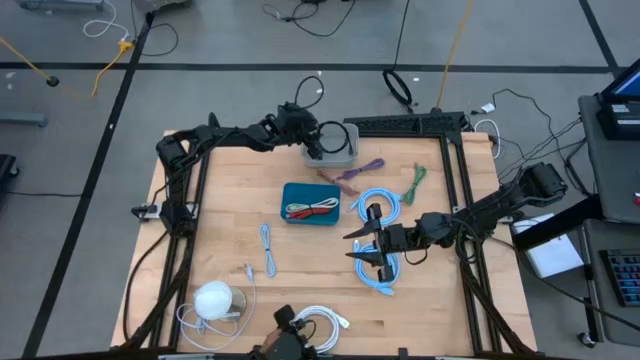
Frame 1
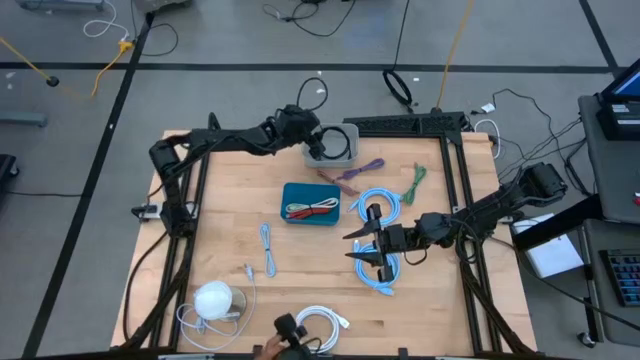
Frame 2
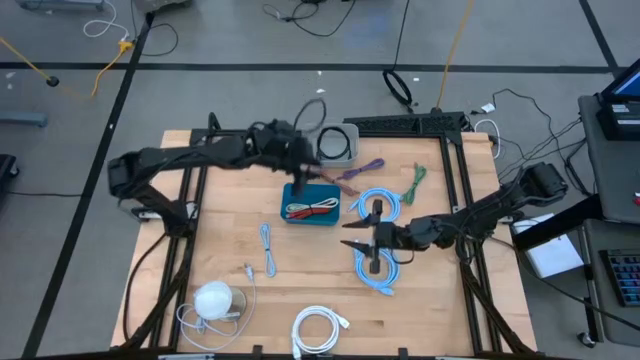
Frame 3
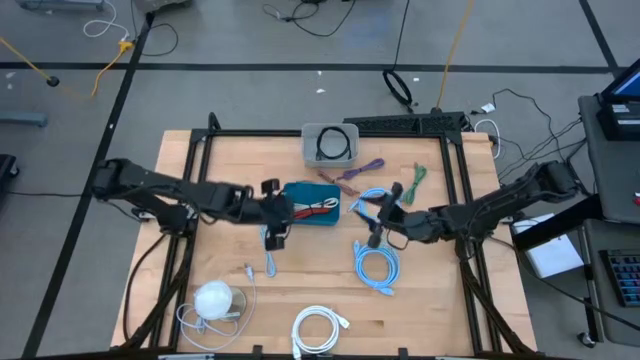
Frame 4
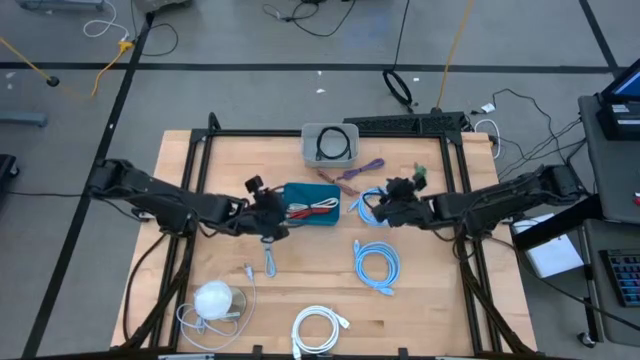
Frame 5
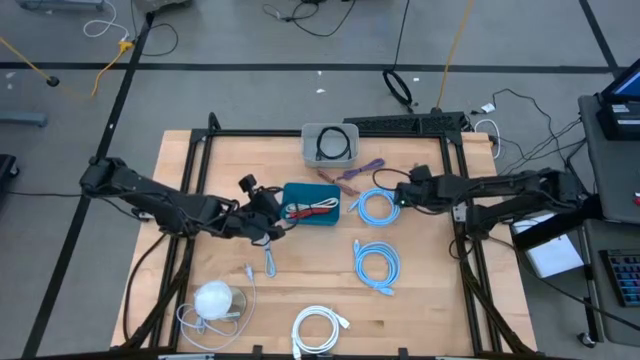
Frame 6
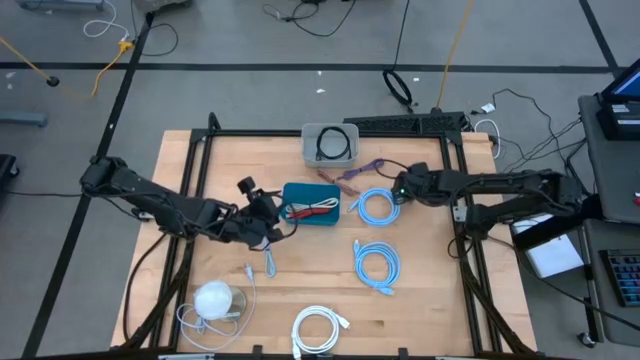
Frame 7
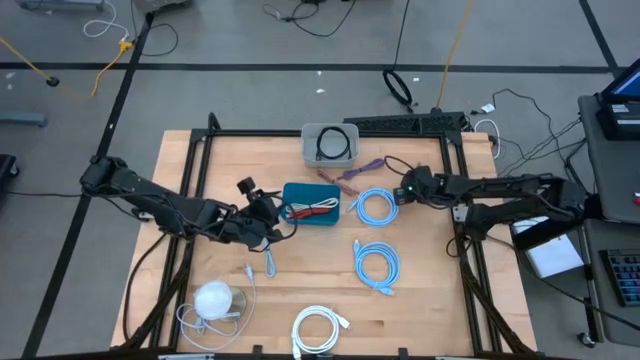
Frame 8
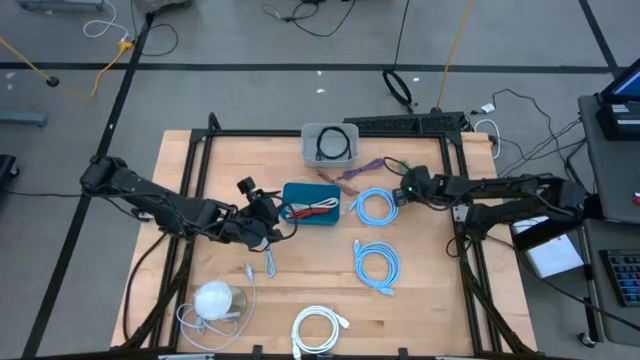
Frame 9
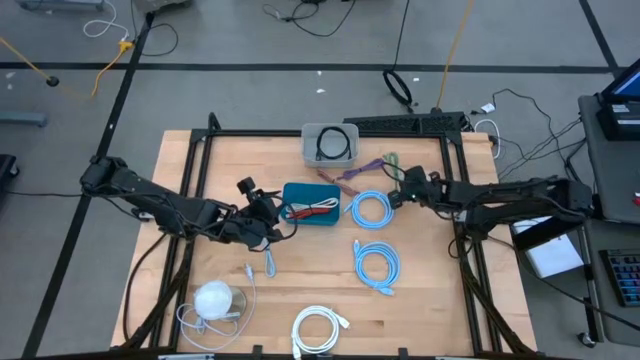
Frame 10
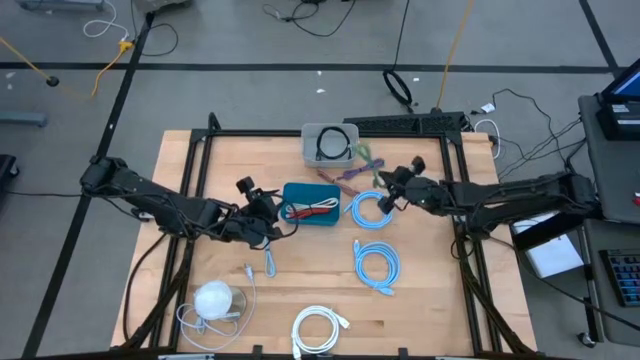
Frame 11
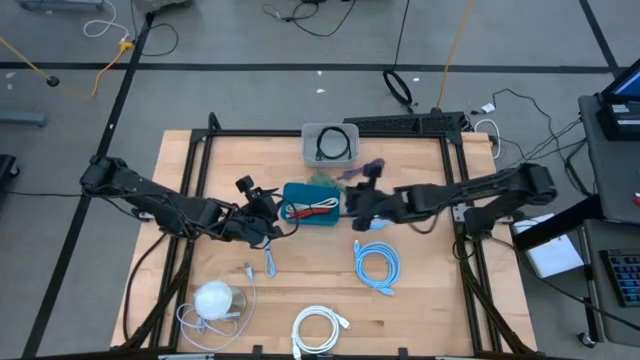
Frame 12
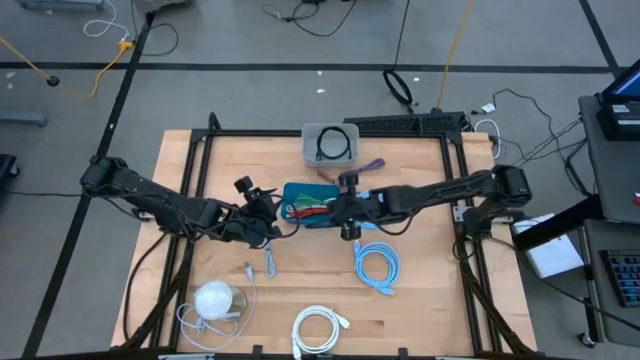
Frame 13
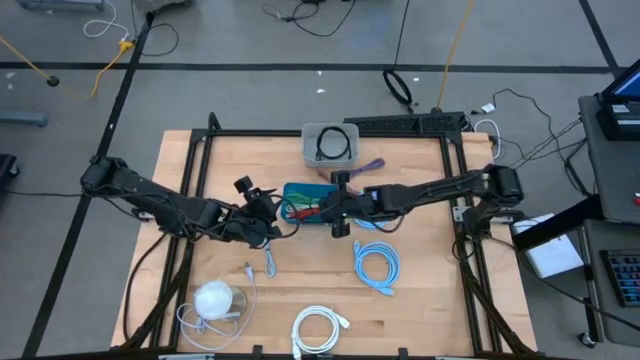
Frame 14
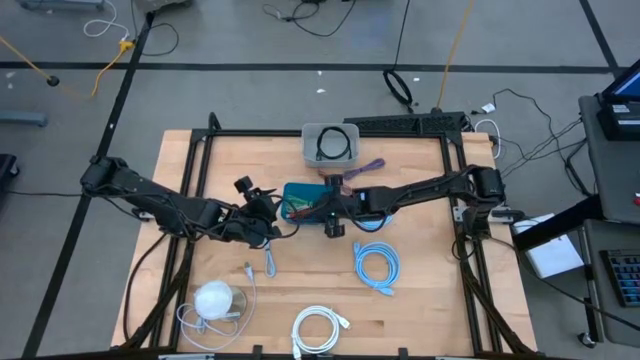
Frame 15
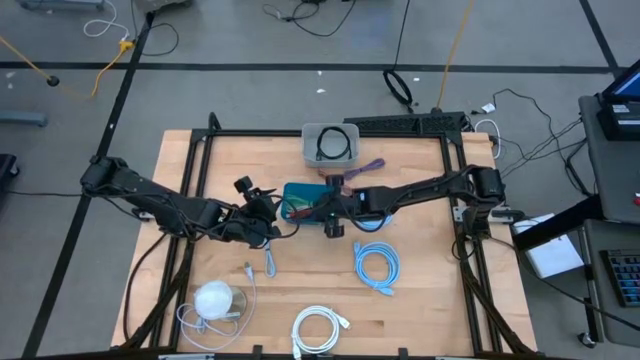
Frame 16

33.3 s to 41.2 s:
Task: Pick & Place USB Port
Put the green charger cable into the blue bin

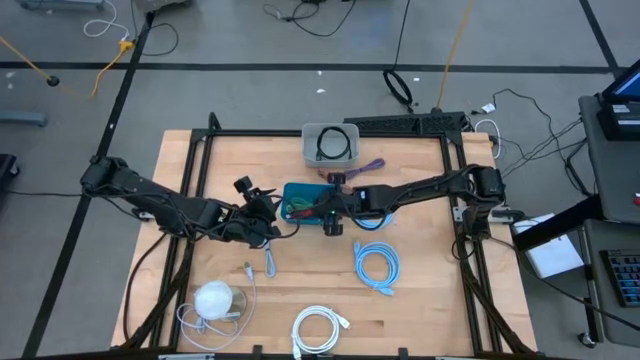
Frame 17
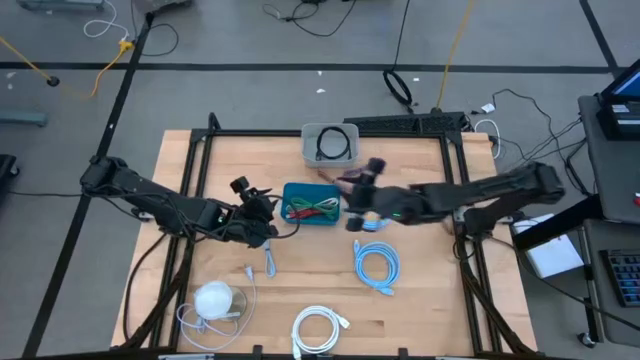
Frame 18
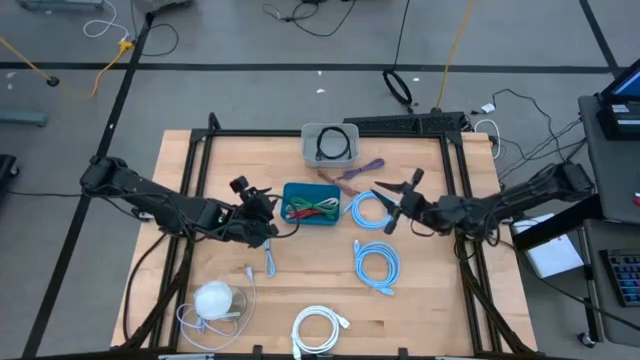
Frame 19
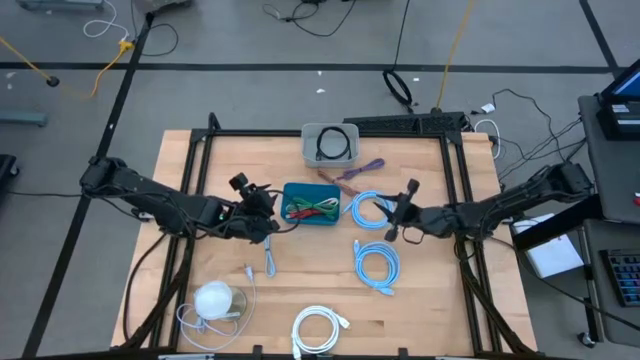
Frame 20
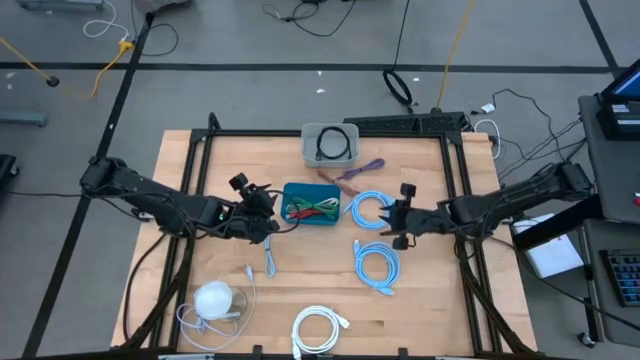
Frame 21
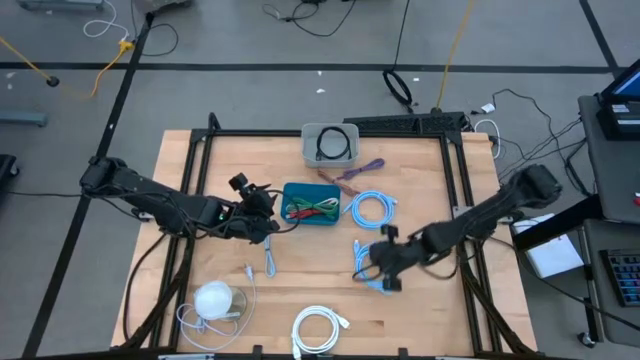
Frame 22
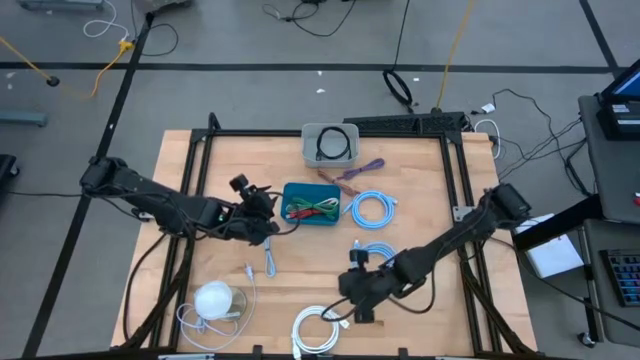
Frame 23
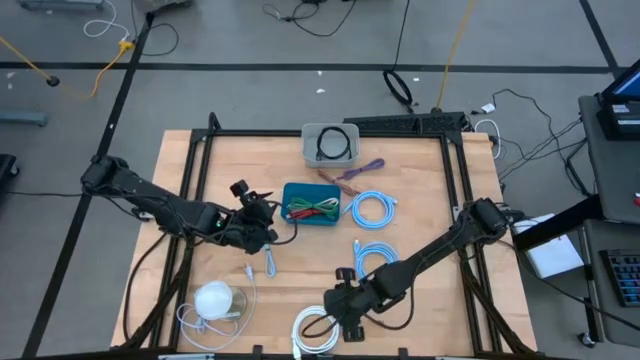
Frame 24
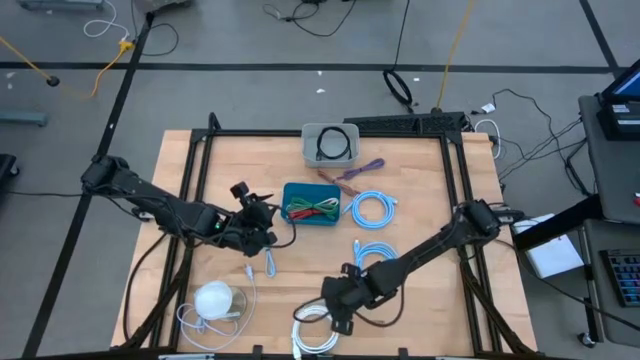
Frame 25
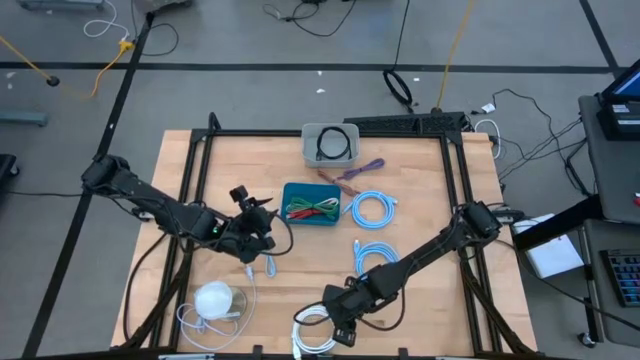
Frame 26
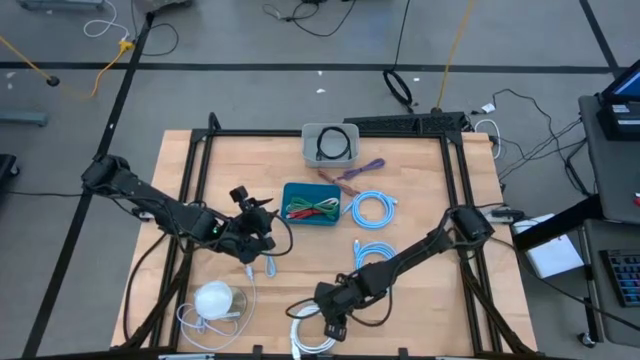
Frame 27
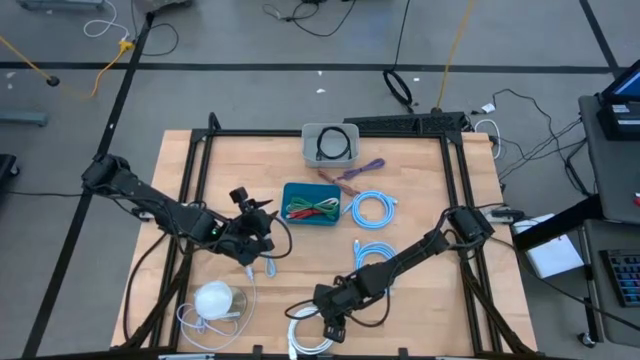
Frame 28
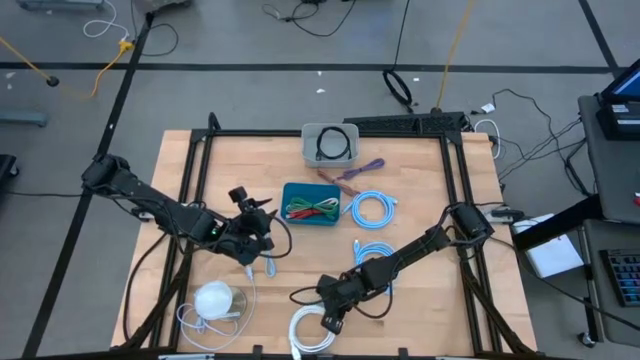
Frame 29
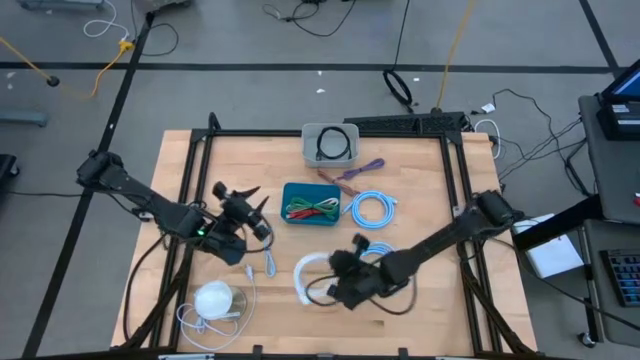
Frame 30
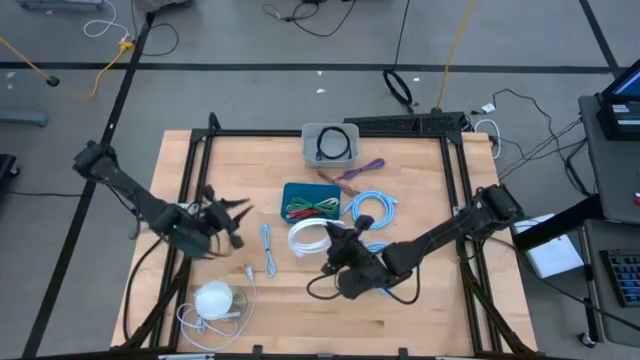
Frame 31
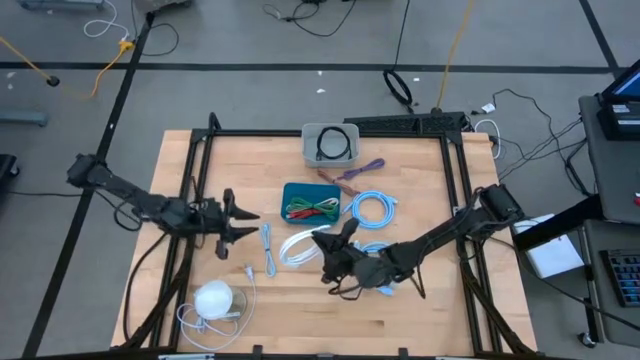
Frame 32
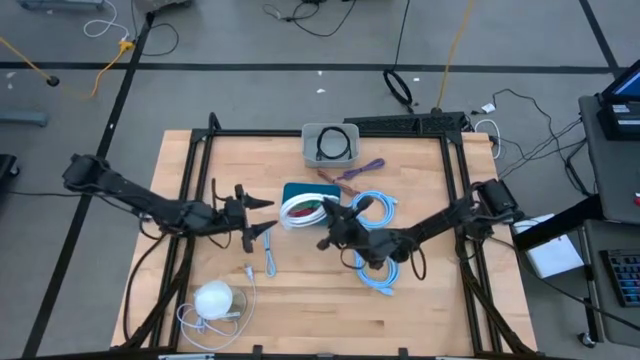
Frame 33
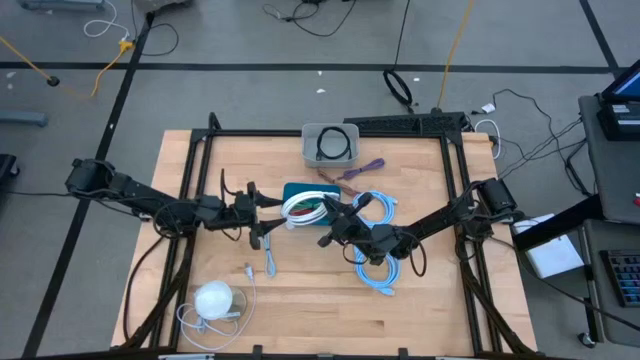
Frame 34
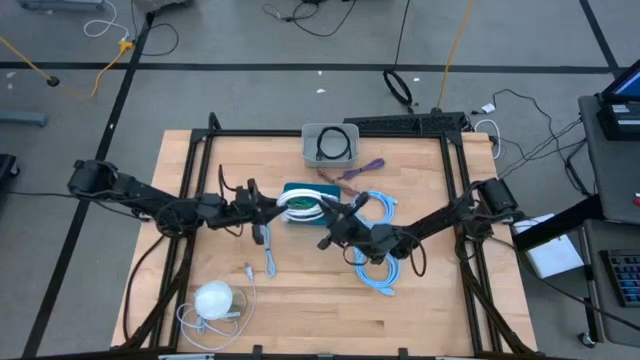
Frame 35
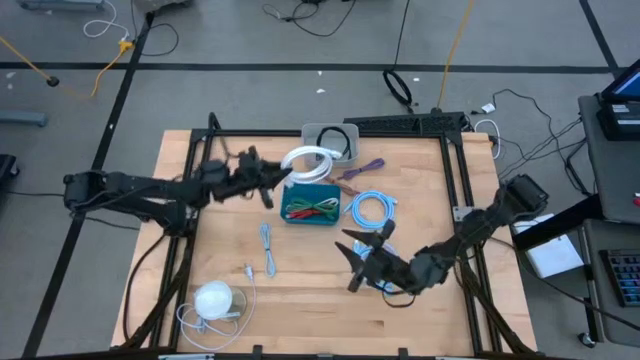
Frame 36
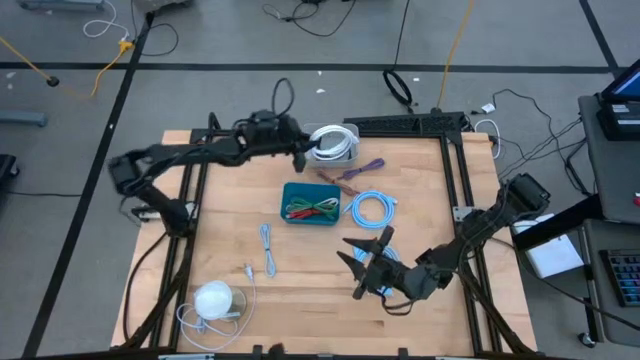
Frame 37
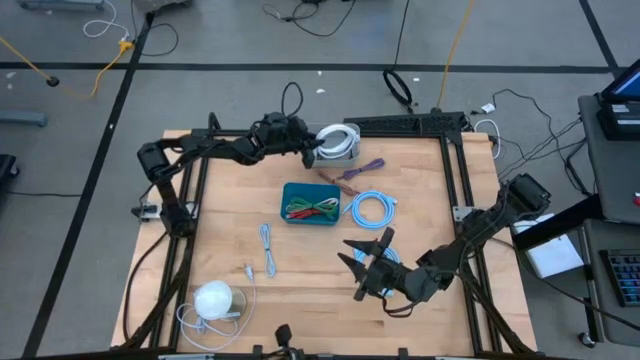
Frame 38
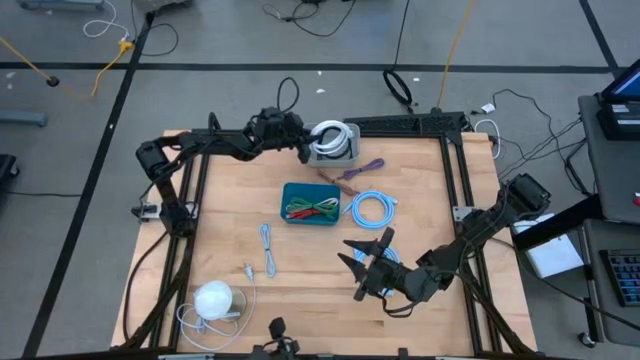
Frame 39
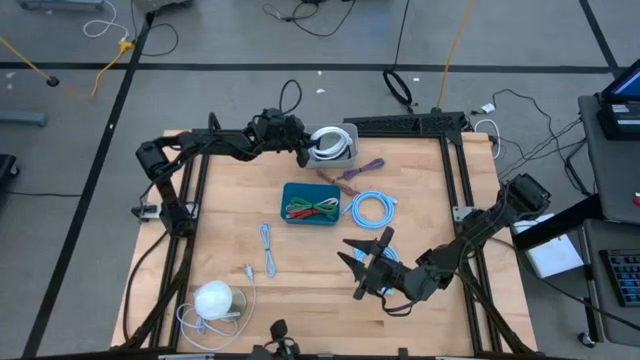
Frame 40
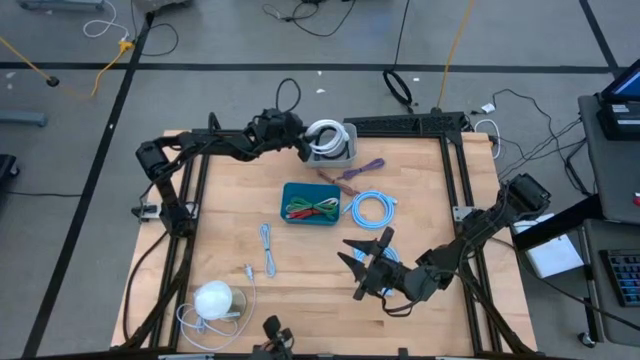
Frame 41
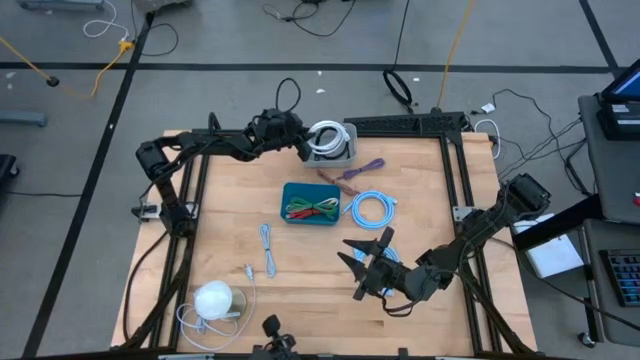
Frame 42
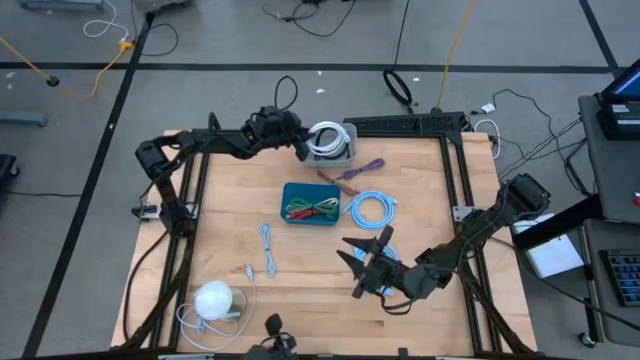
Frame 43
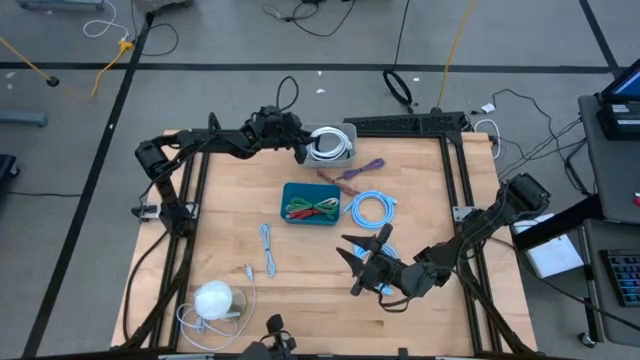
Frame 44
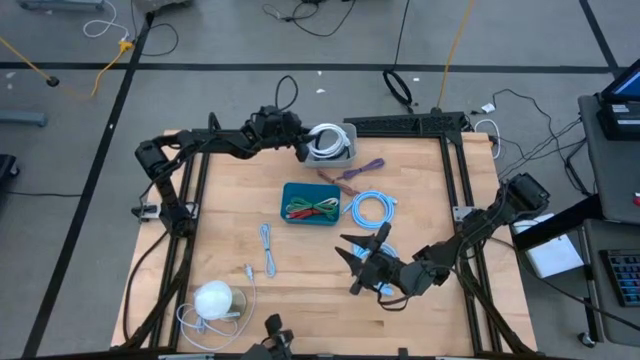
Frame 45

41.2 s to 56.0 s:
Put the white HDMI cable into the gray bin
